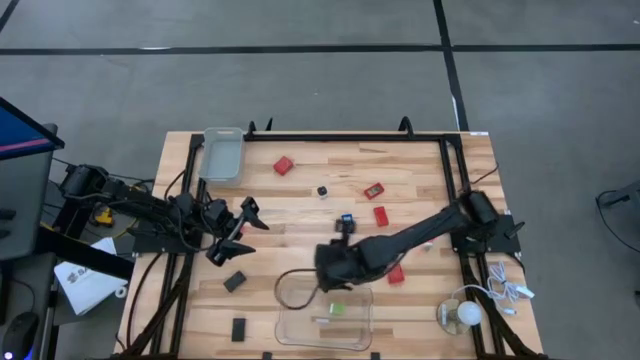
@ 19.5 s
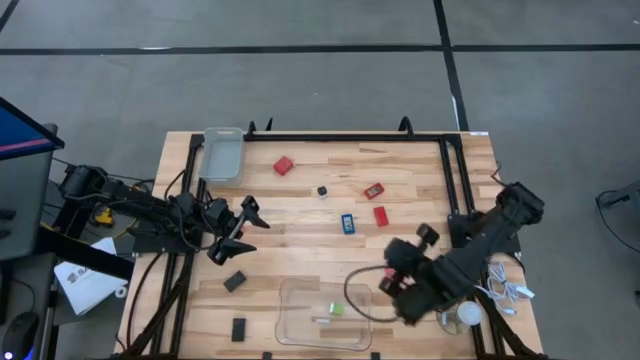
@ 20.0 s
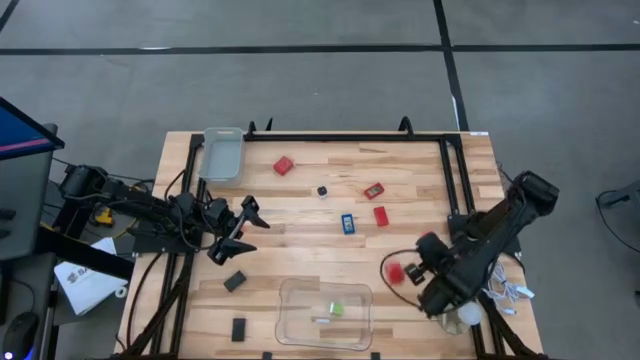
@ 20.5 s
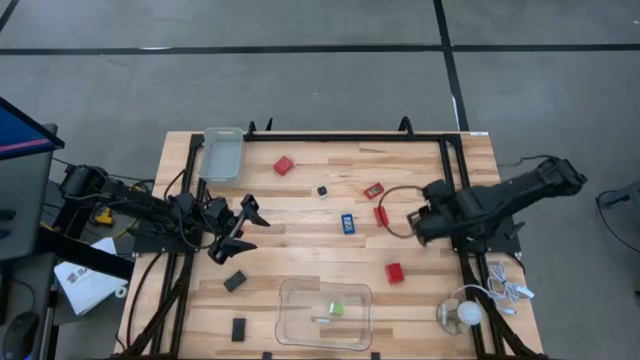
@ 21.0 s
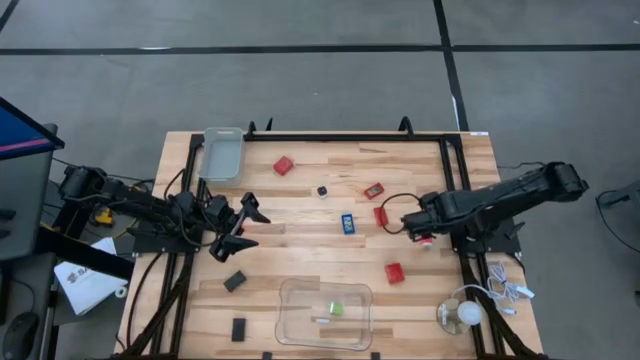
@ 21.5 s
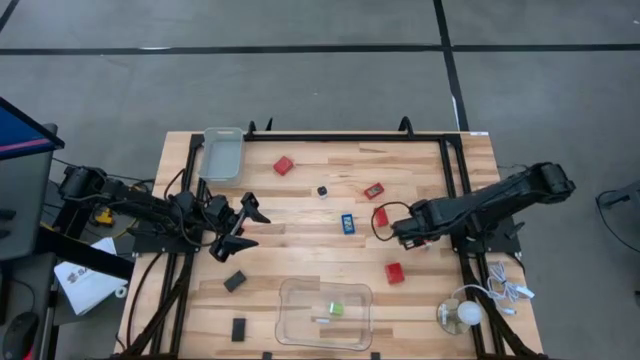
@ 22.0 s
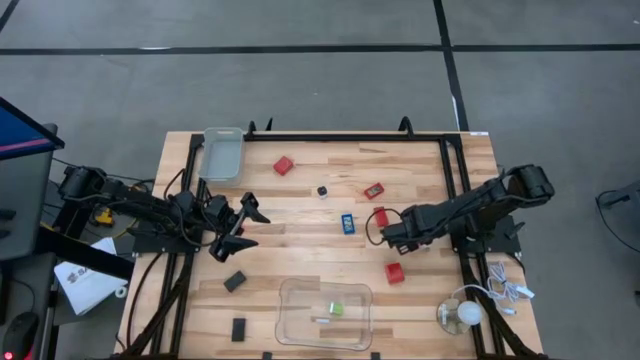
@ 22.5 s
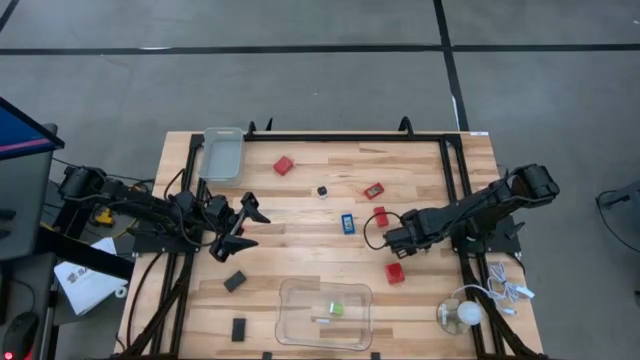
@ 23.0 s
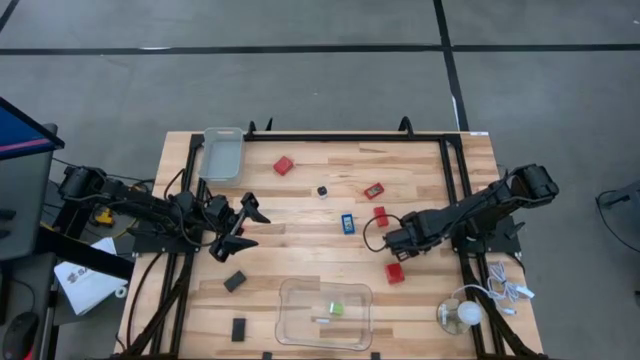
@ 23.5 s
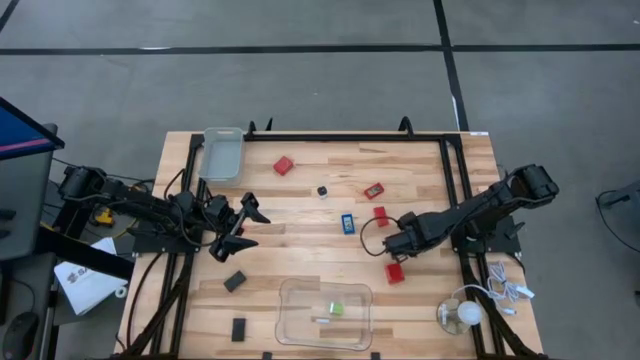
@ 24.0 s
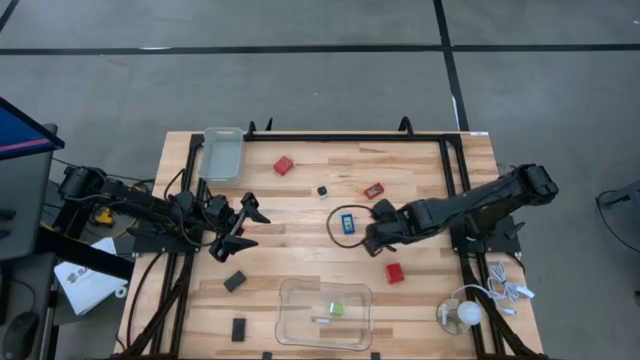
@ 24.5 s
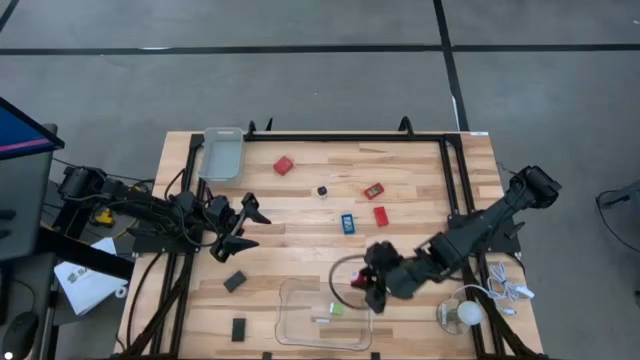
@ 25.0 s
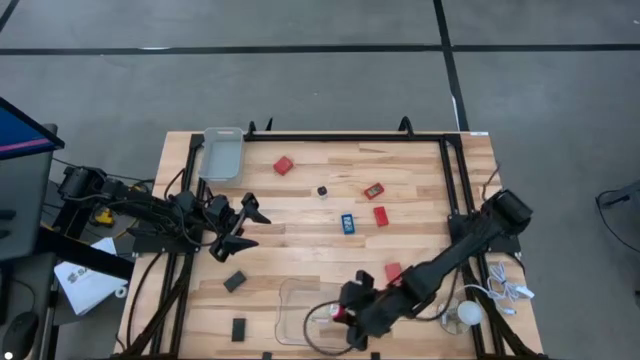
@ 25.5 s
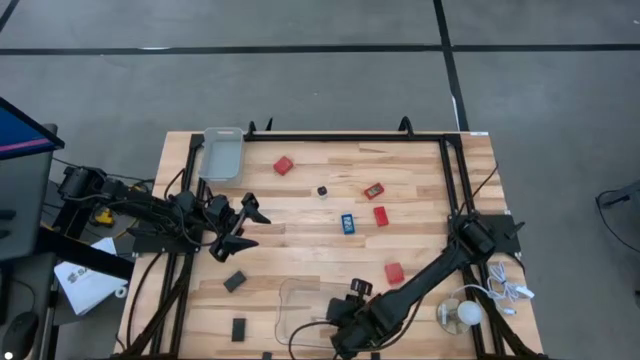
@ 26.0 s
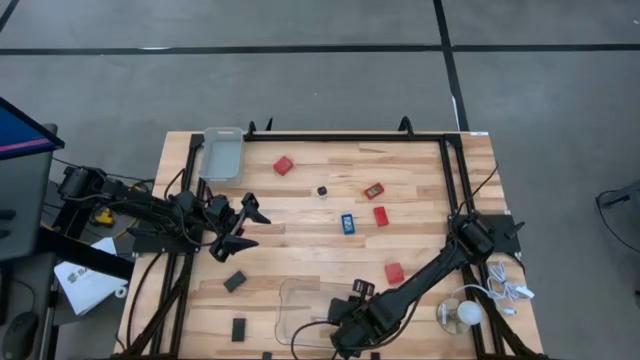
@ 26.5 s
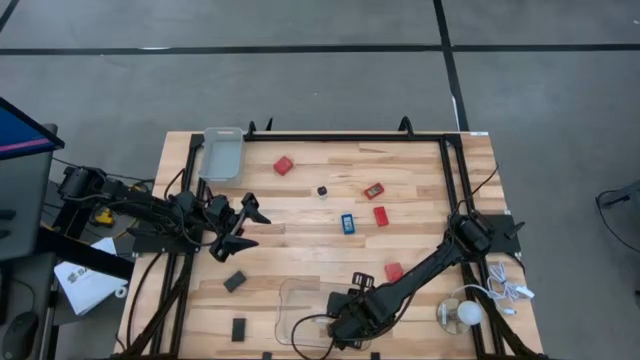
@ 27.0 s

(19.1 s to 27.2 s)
Task: Pick & Place Office items
Put the right pink charger adapter into the transparent bin

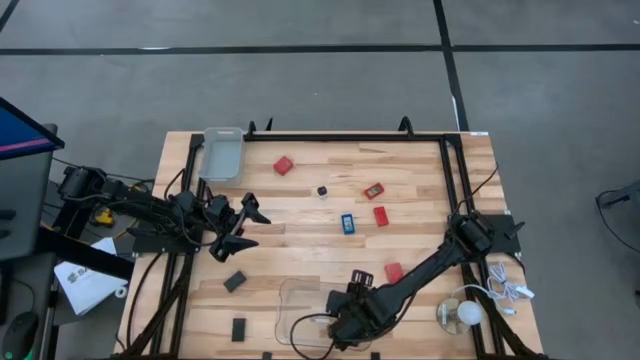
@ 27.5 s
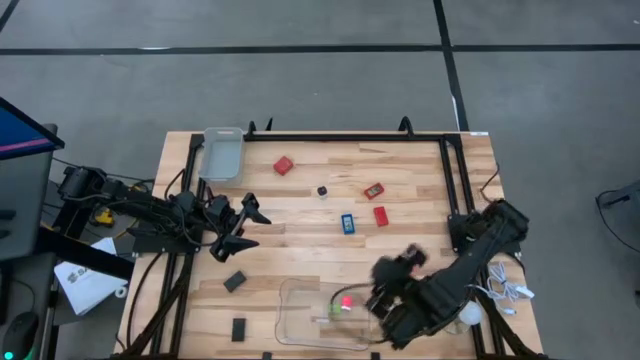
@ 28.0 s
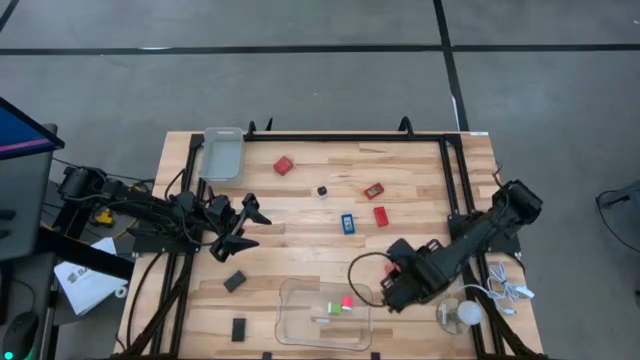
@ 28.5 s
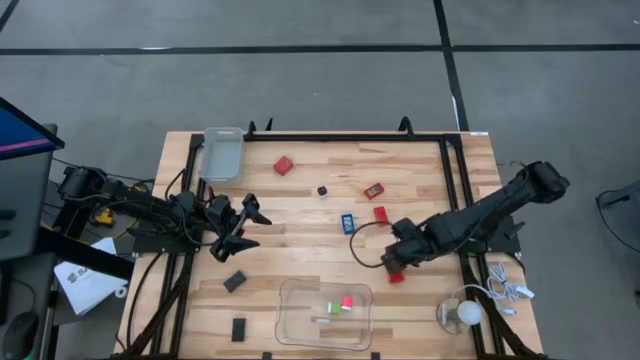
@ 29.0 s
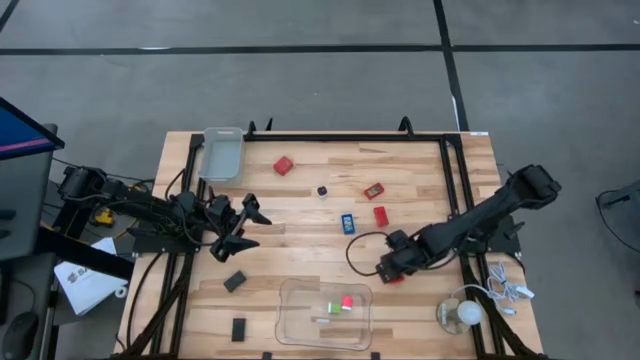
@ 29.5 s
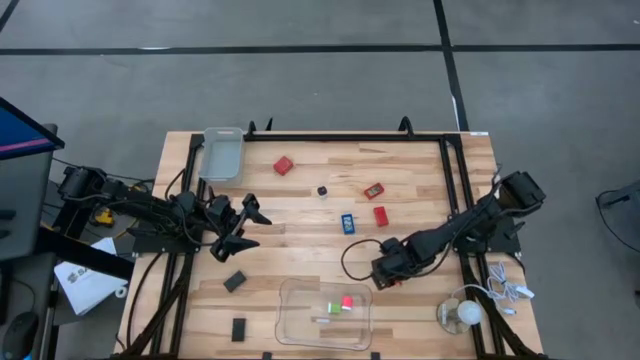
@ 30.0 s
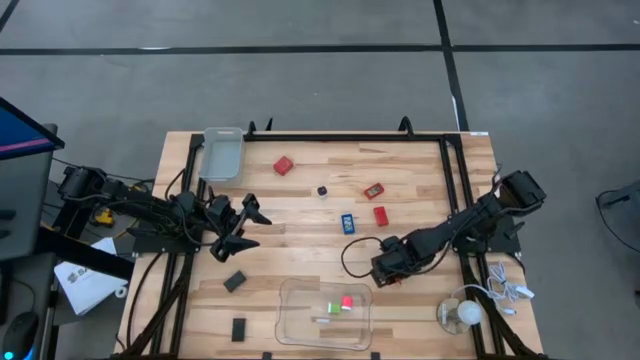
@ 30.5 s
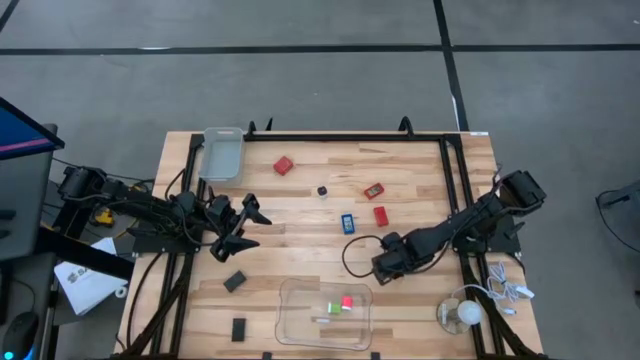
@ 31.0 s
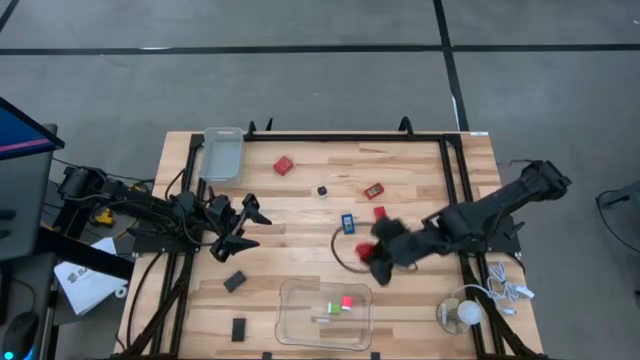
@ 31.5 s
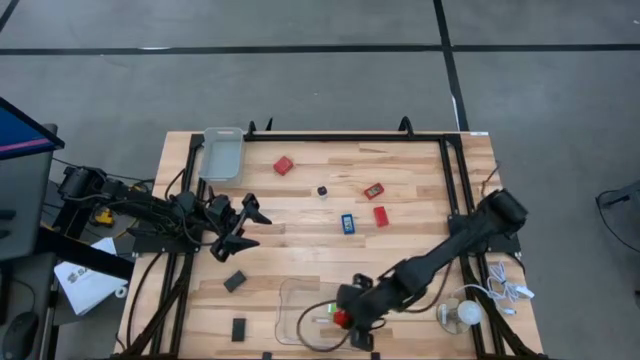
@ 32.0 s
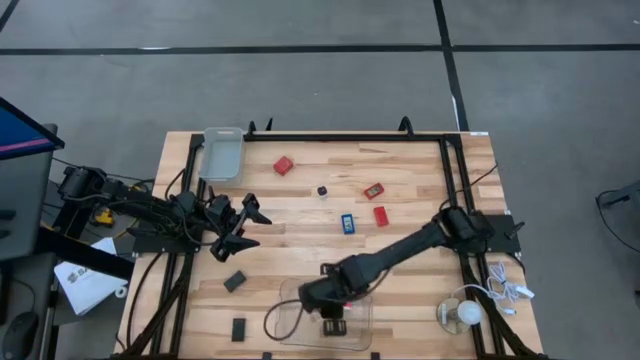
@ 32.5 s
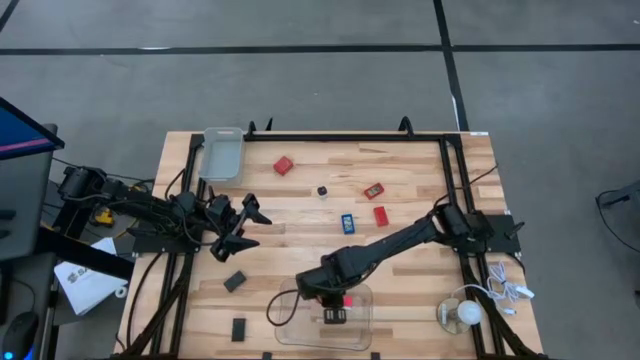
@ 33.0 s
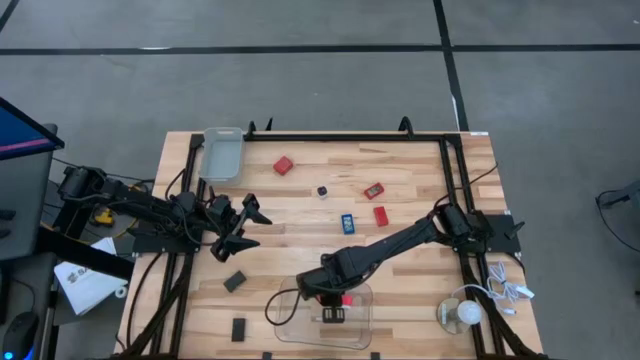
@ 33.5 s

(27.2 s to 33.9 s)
Put the bottom red charger adapter into the transparent bin

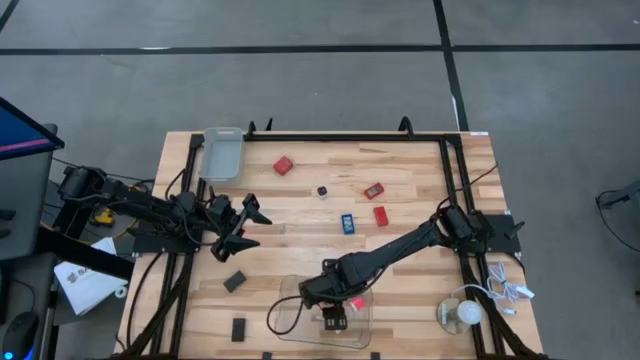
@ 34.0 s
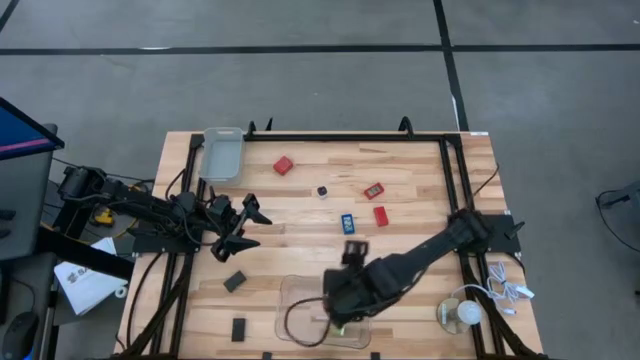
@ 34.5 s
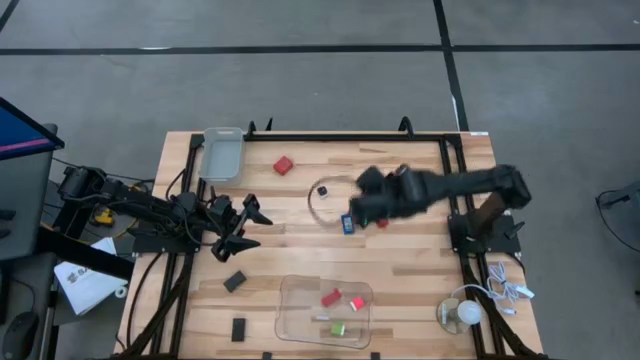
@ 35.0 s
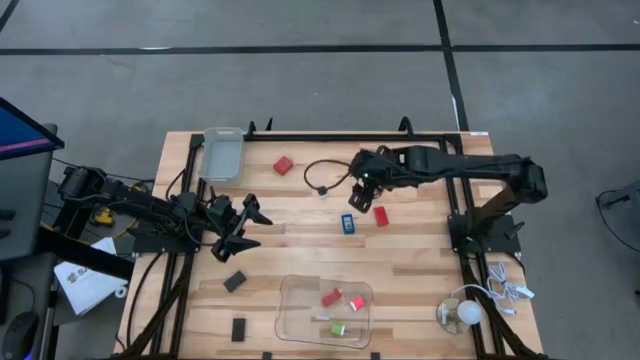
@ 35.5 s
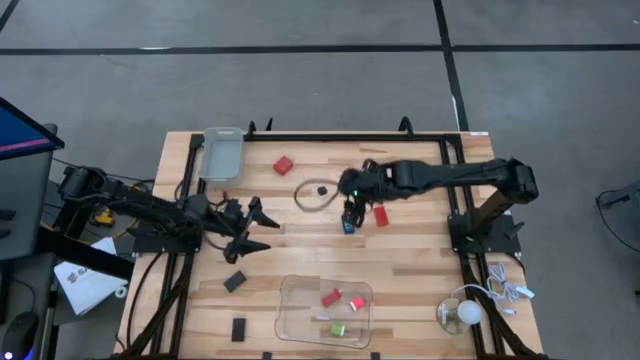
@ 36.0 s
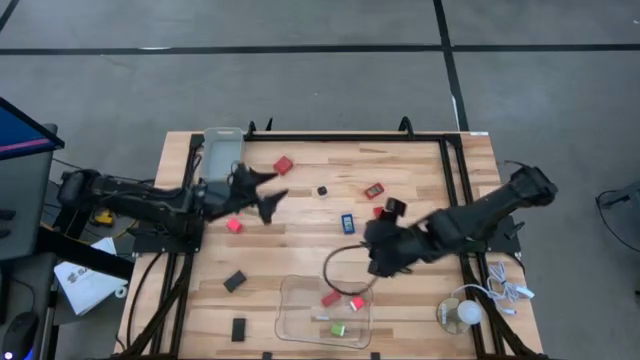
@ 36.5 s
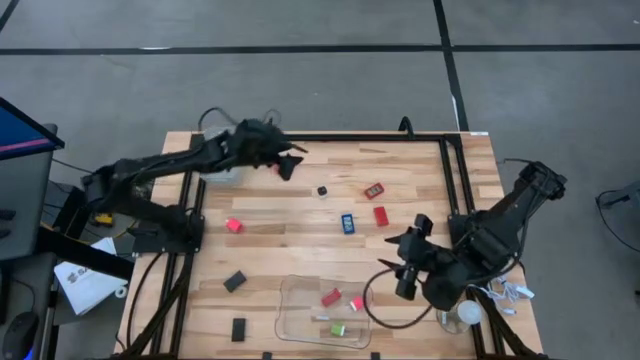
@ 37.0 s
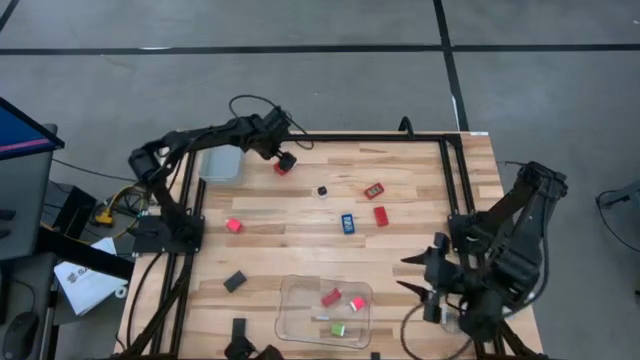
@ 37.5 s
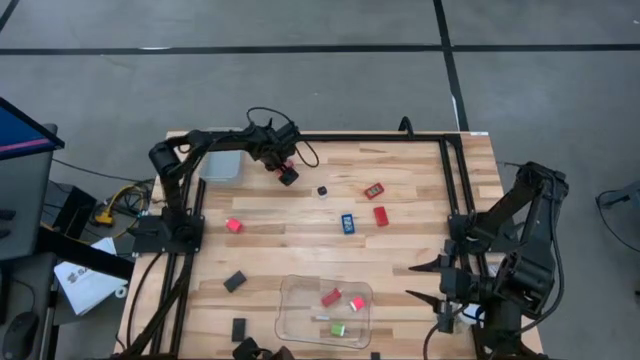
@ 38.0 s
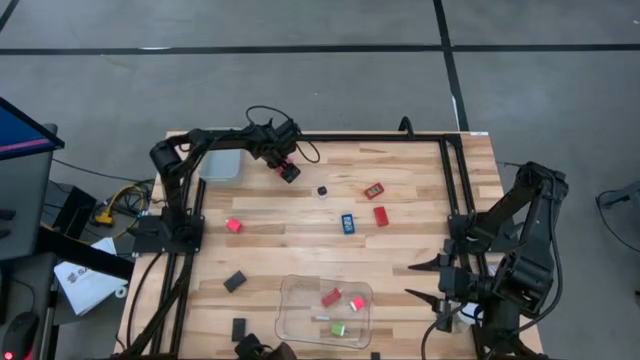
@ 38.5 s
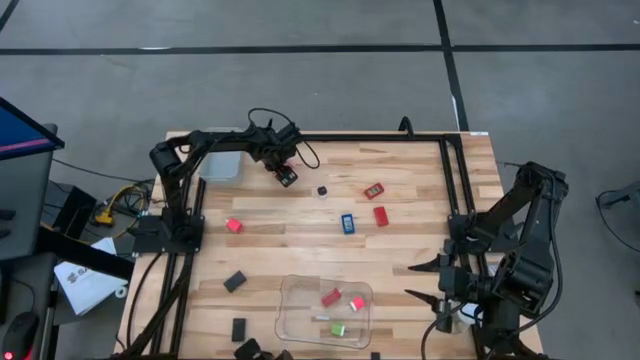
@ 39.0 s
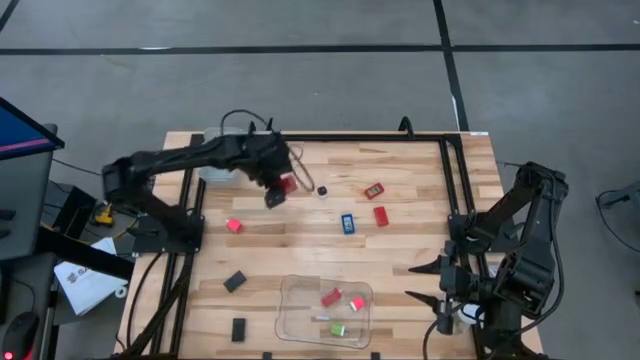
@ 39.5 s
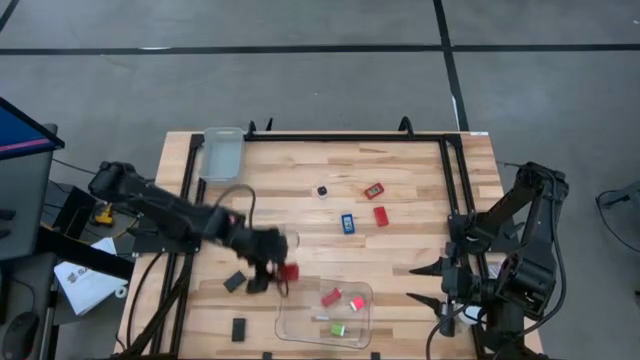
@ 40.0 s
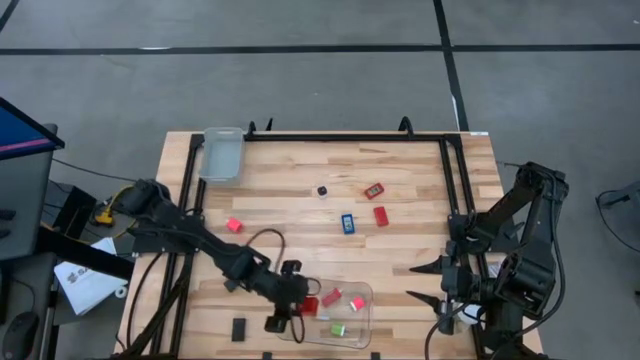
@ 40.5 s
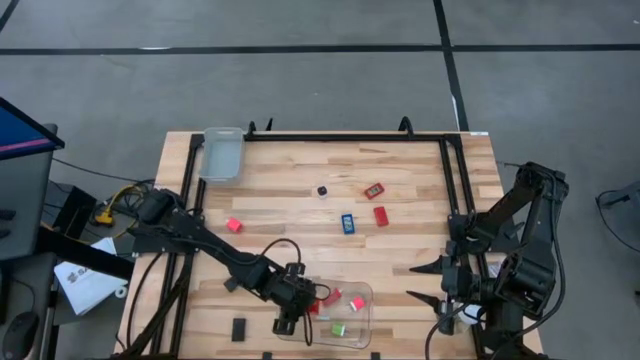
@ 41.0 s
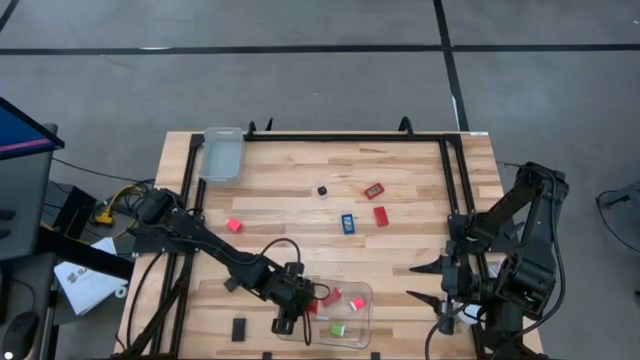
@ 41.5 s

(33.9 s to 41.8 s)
Put the red charger adapter into the transparent bin
